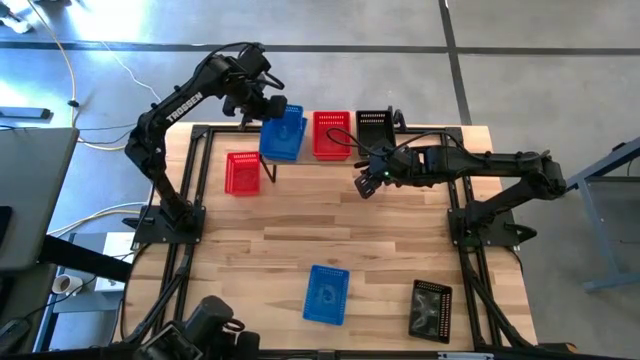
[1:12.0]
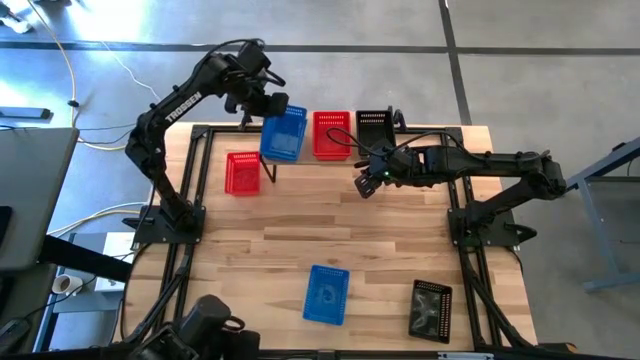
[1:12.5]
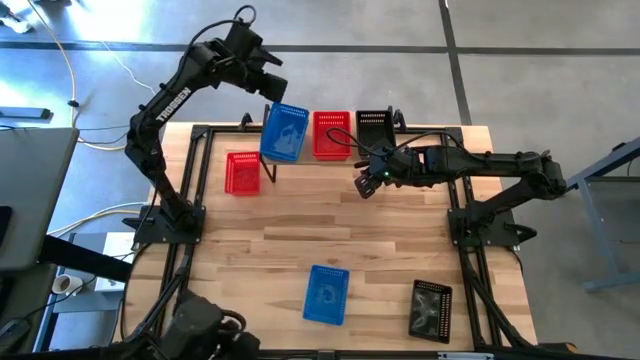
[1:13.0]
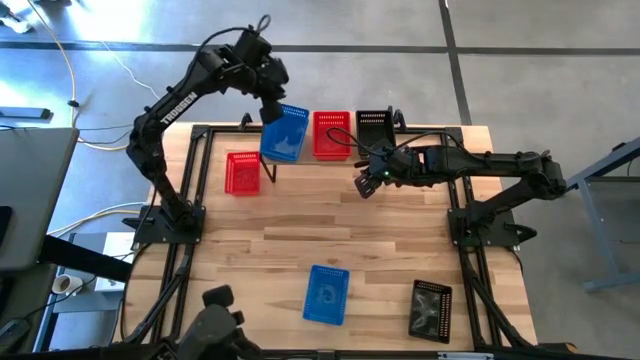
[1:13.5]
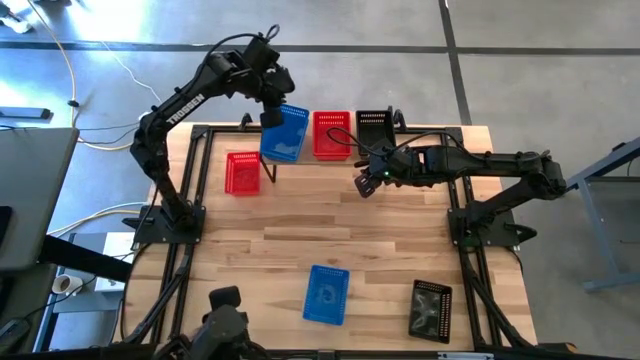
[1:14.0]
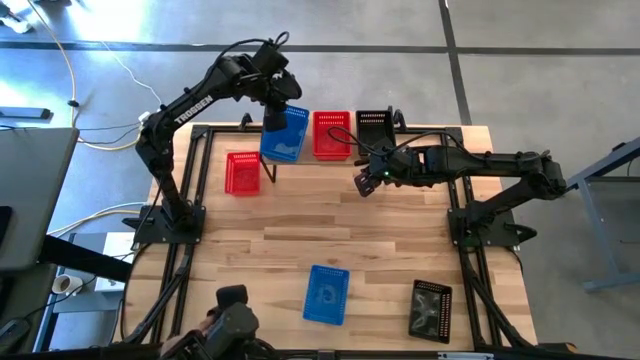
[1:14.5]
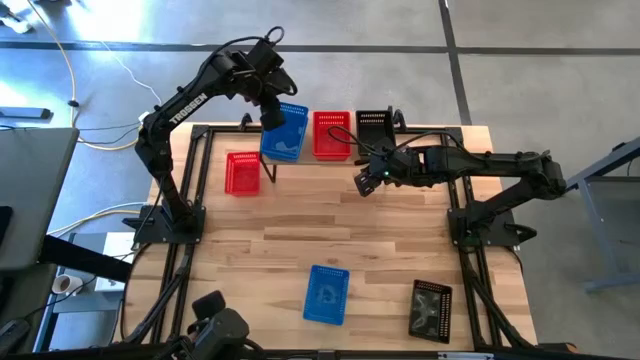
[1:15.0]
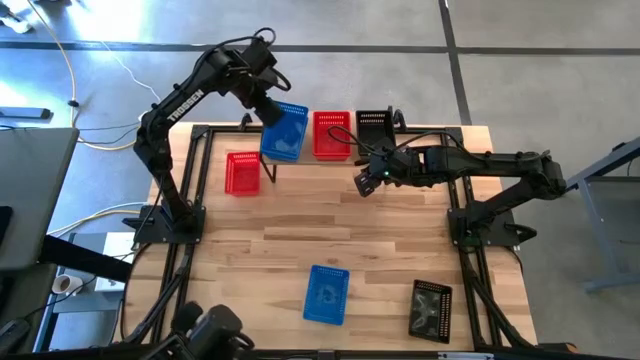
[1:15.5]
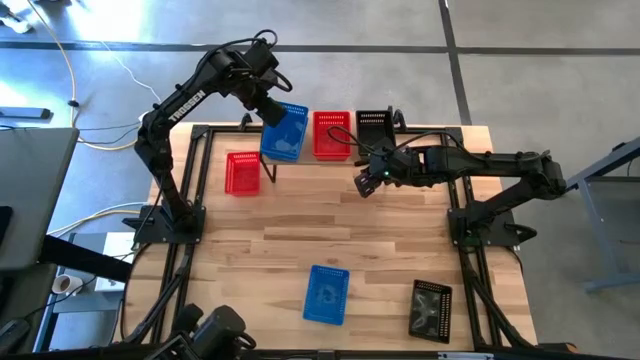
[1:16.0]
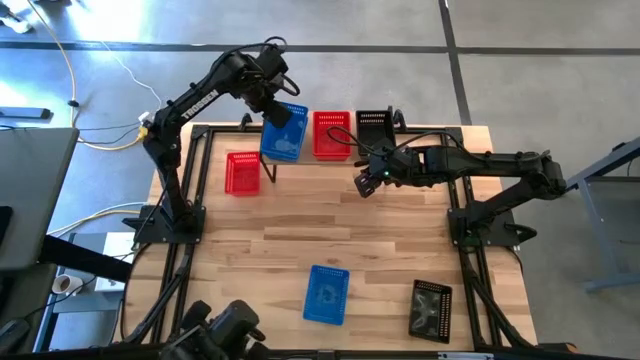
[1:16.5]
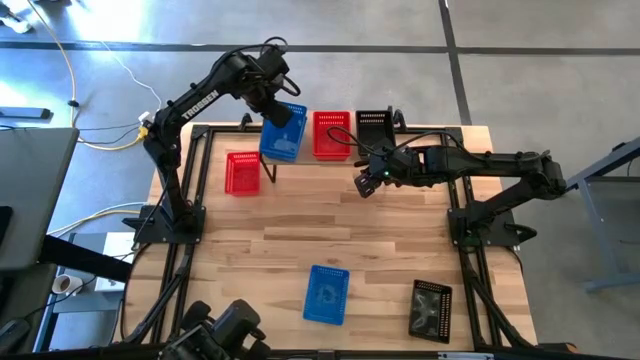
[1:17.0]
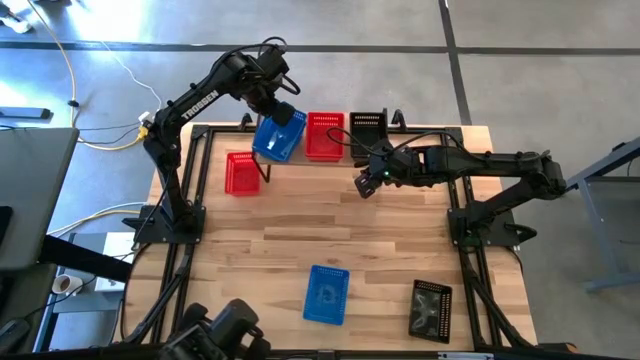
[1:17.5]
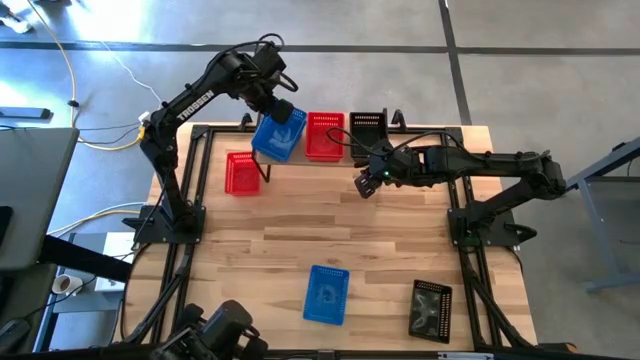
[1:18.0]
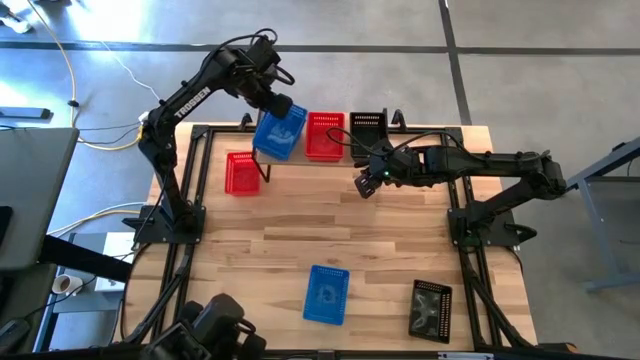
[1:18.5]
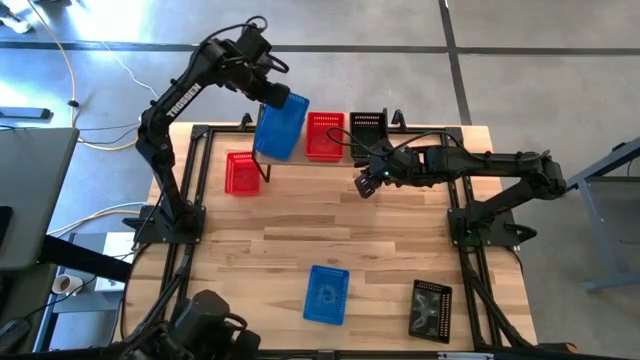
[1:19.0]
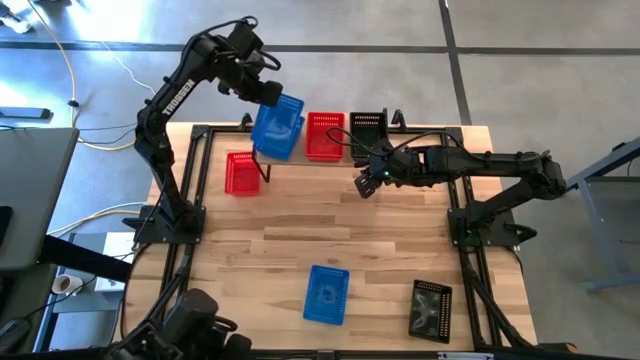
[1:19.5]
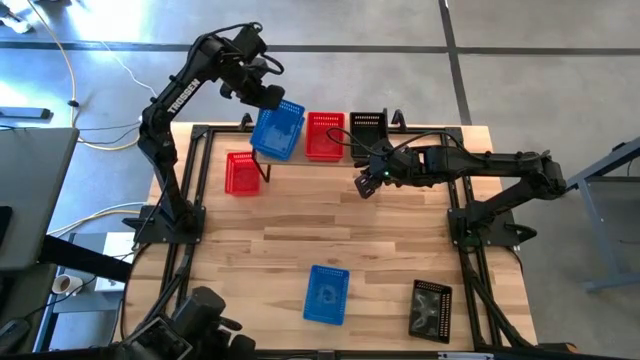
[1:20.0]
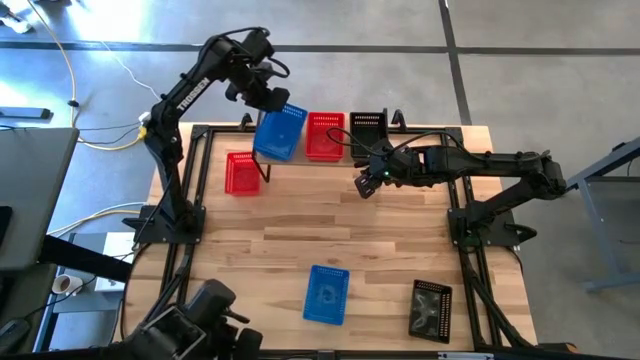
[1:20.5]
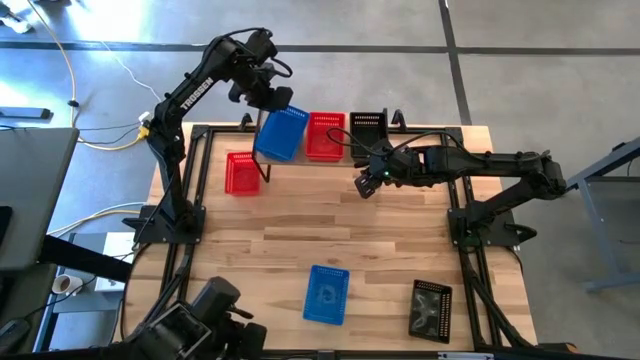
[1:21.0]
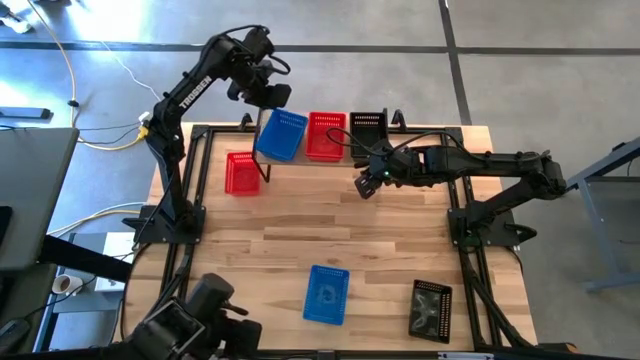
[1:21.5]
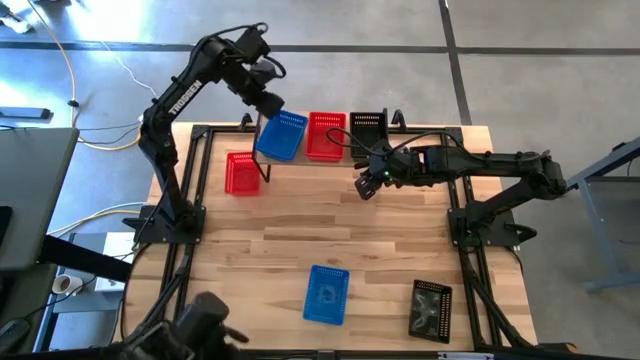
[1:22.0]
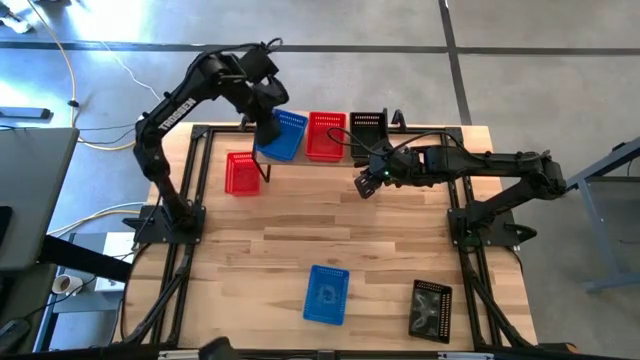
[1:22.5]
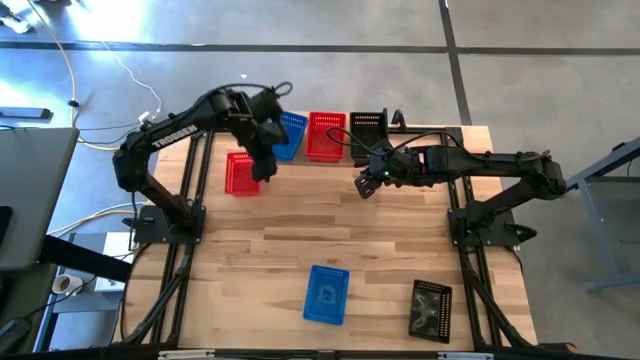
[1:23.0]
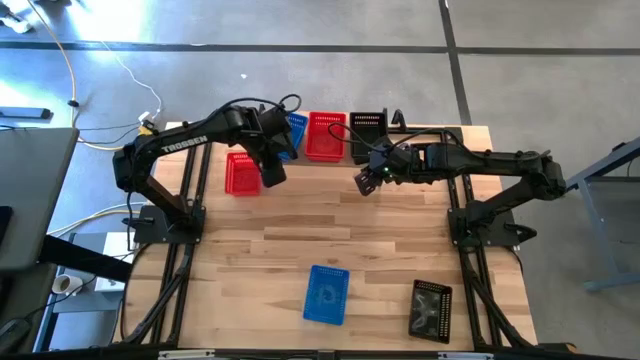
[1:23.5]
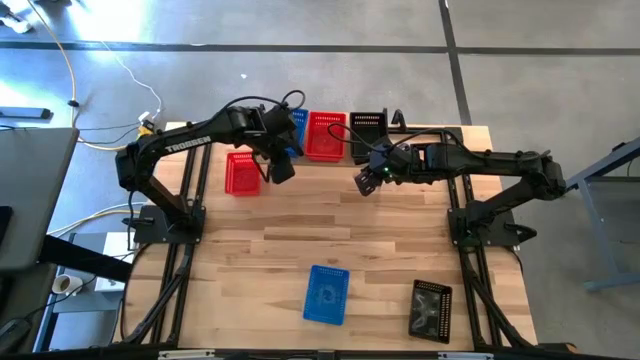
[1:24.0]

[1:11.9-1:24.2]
Task: Stack baskets on shelf by color
Stack the top blue basket into the blue basket on the shelf

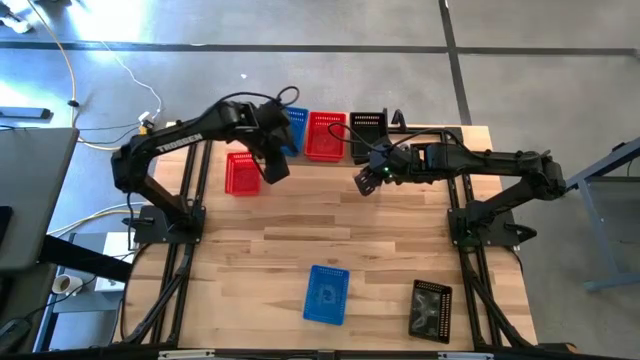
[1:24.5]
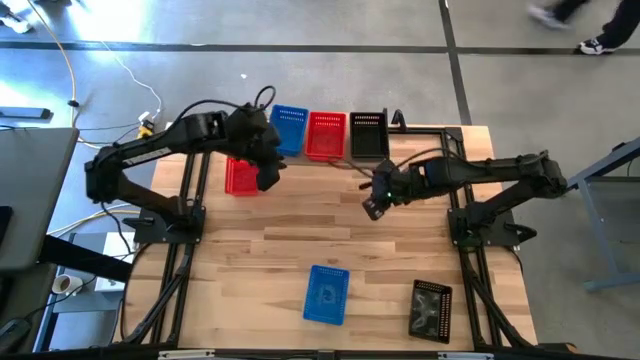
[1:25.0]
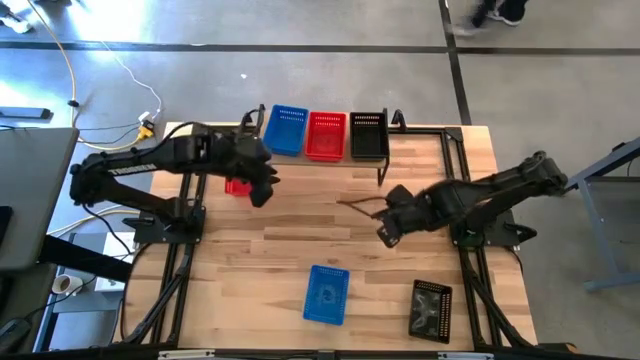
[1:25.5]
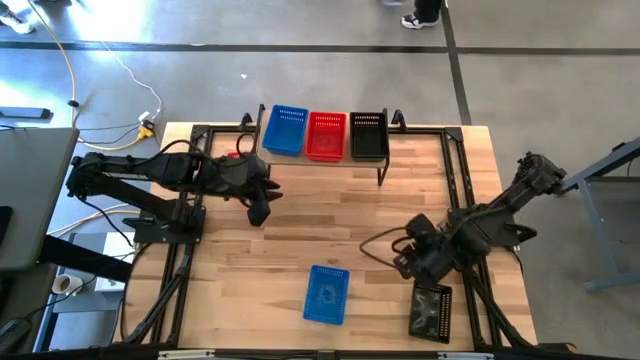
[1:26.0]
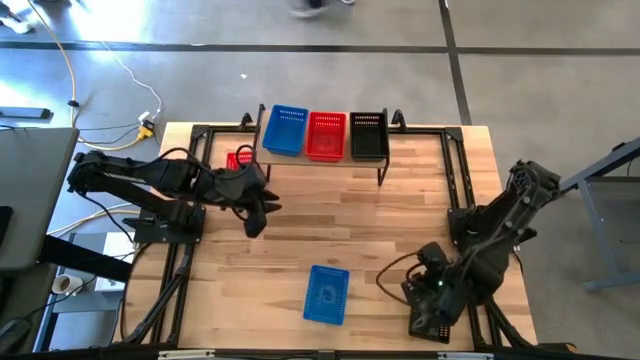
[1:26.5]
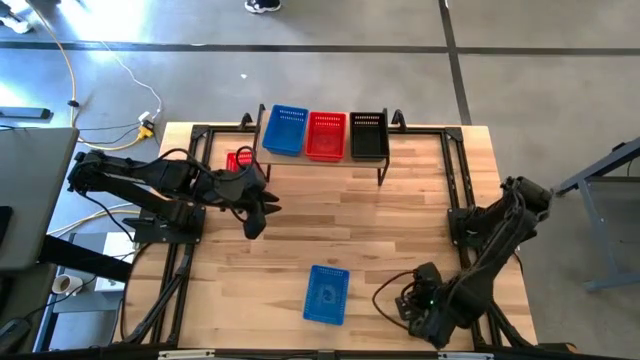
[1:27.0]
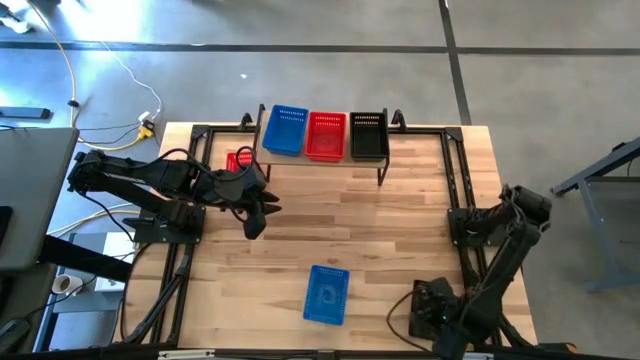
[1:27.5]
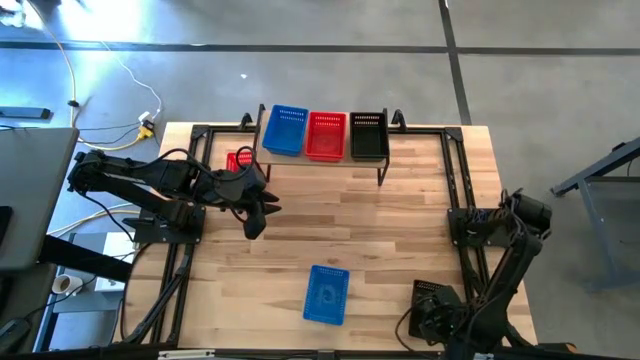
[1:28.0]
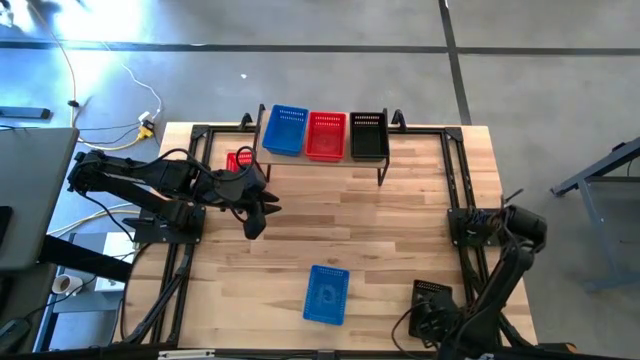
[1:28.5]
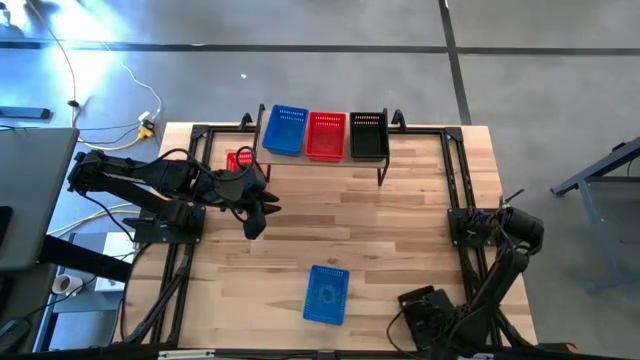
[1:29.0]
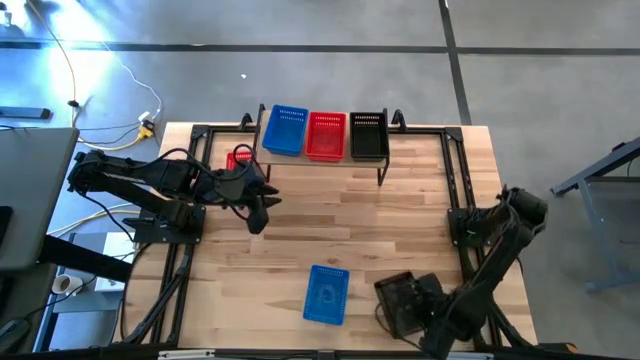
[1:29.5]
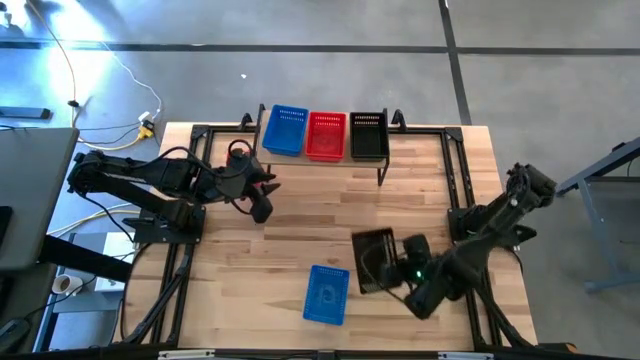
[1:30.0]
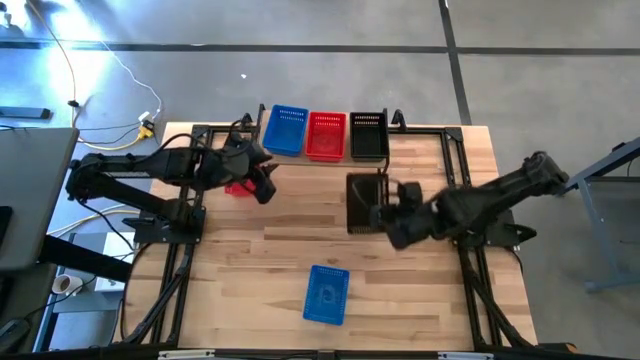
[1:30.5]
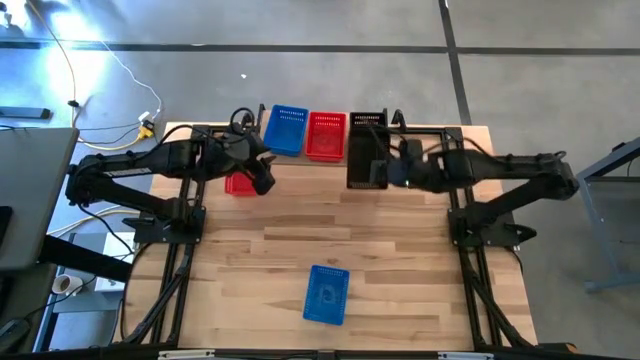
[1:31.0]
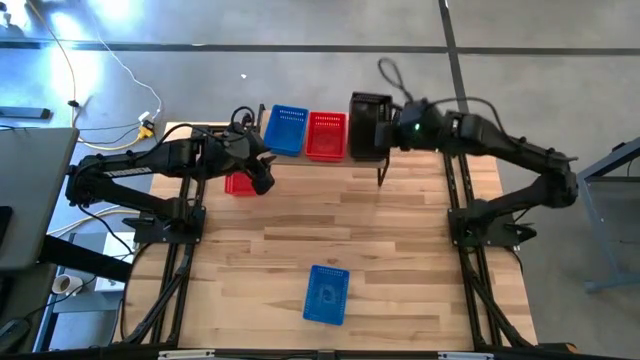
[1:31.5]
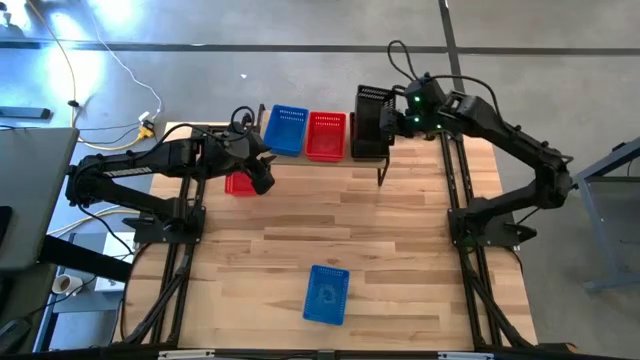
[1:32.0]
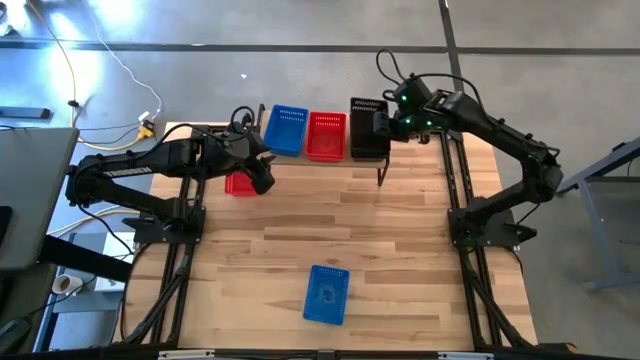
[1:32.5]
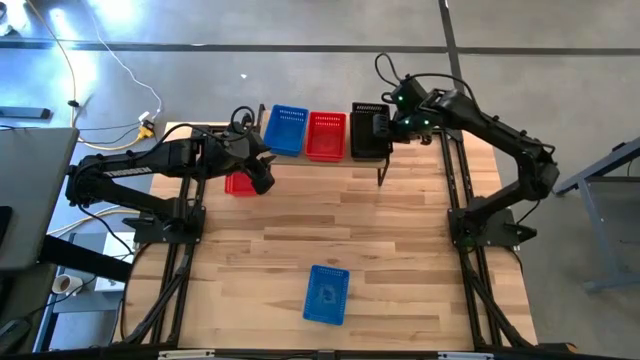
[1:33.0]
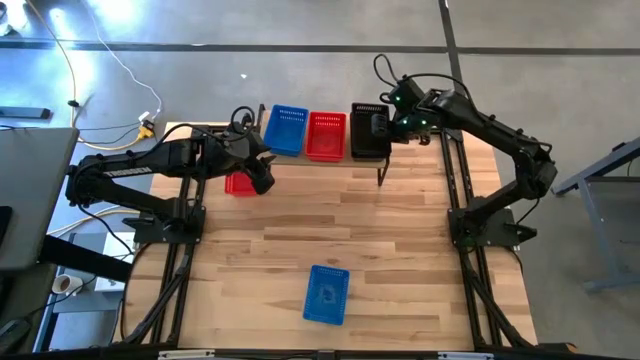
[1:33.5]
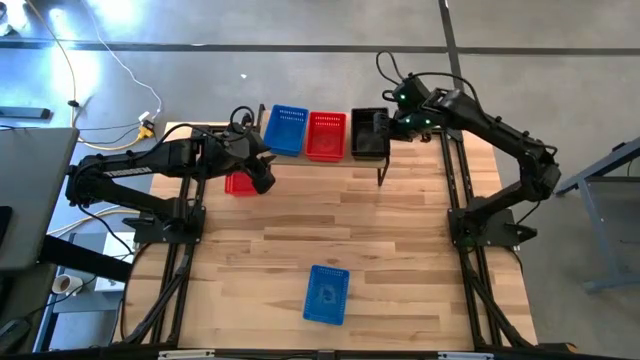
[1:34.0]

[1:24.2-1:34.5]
Stack the black basket into the black baskets on the shelf
